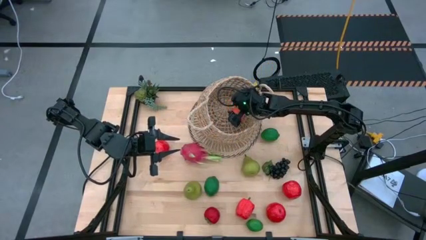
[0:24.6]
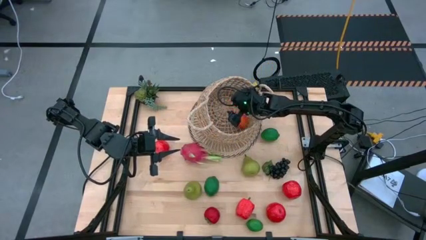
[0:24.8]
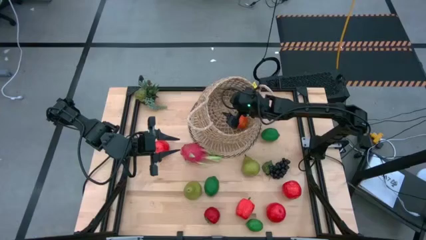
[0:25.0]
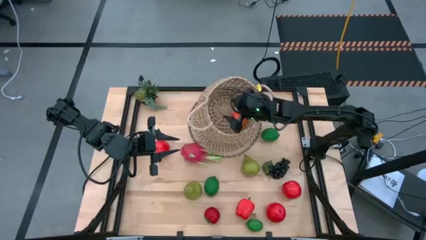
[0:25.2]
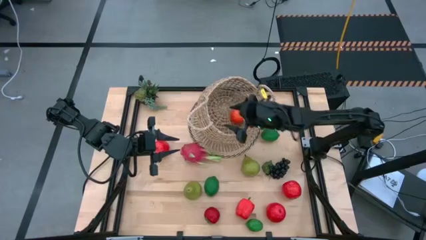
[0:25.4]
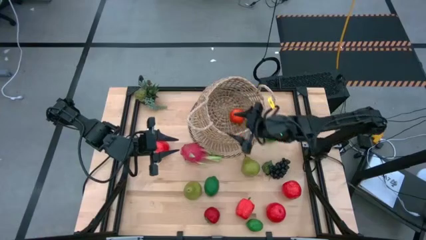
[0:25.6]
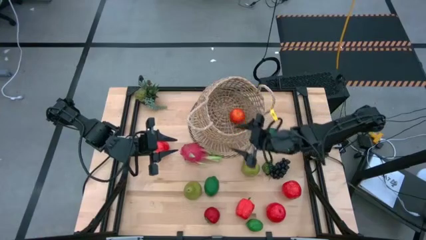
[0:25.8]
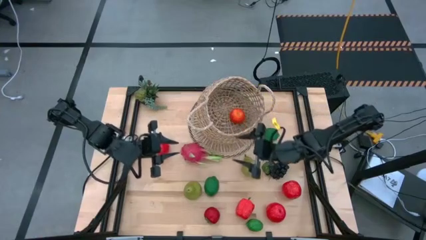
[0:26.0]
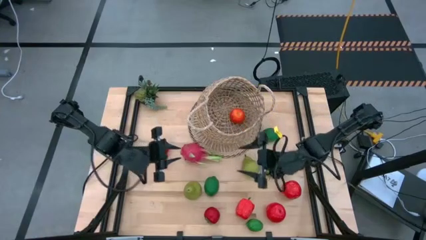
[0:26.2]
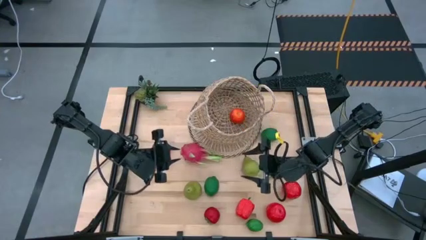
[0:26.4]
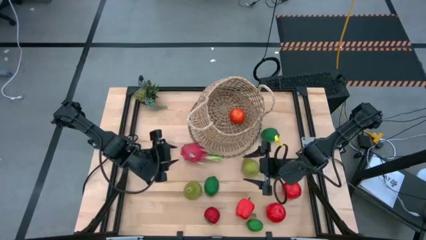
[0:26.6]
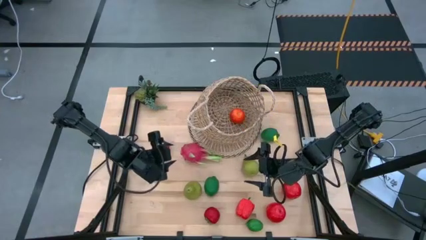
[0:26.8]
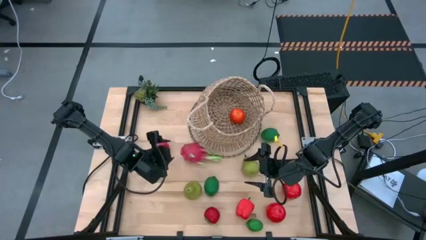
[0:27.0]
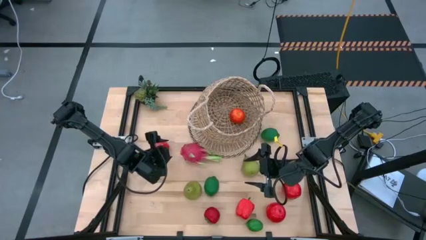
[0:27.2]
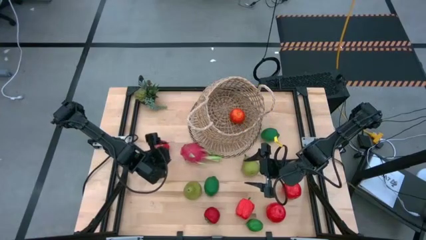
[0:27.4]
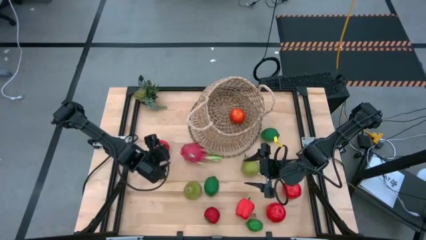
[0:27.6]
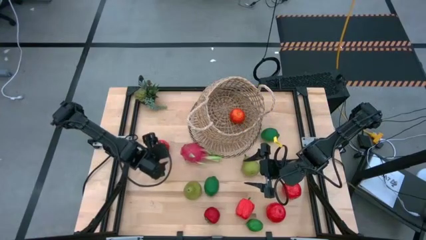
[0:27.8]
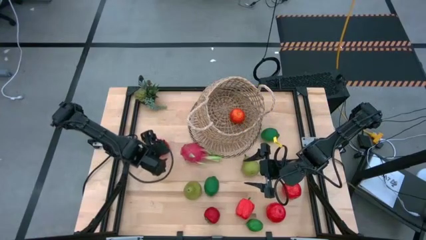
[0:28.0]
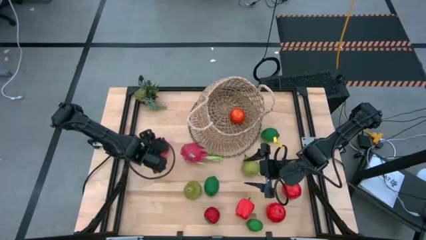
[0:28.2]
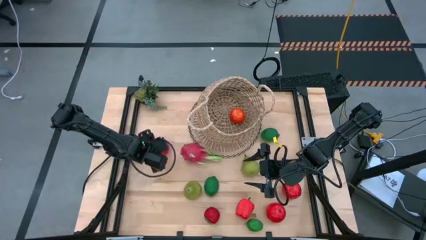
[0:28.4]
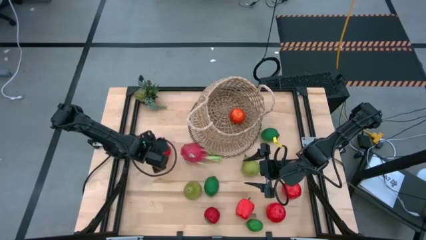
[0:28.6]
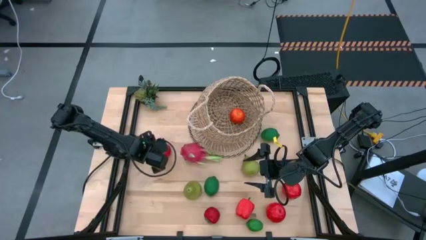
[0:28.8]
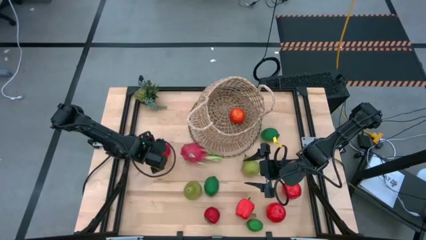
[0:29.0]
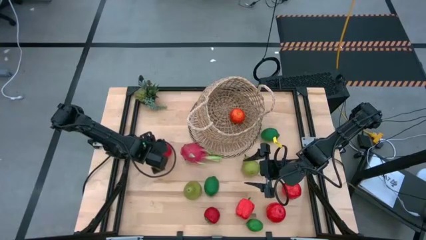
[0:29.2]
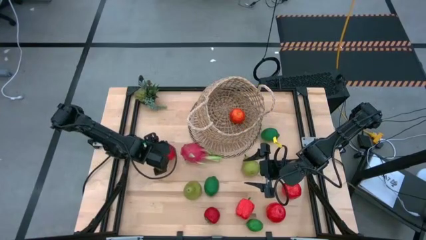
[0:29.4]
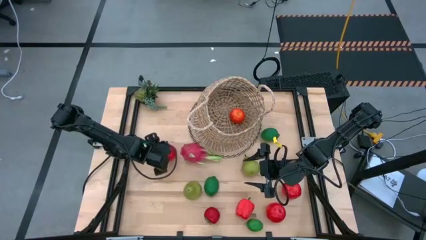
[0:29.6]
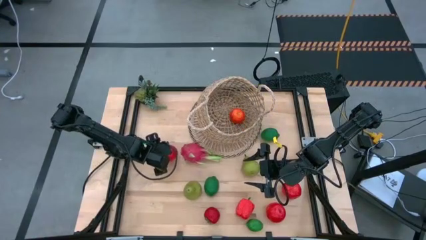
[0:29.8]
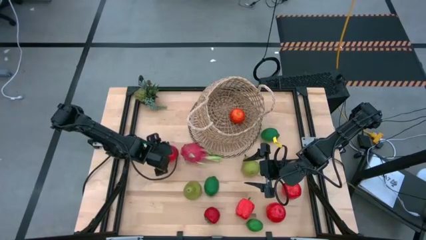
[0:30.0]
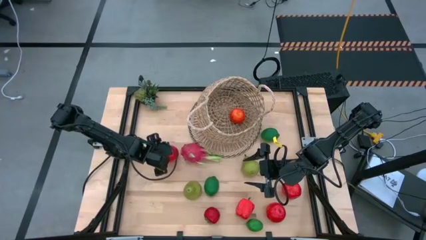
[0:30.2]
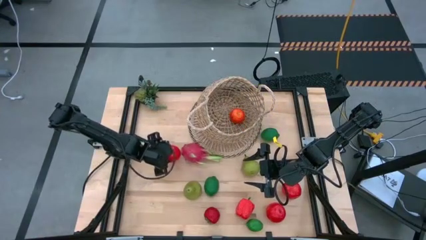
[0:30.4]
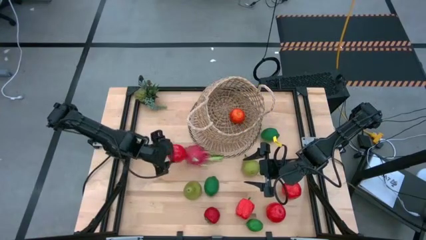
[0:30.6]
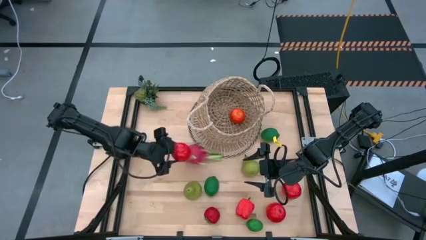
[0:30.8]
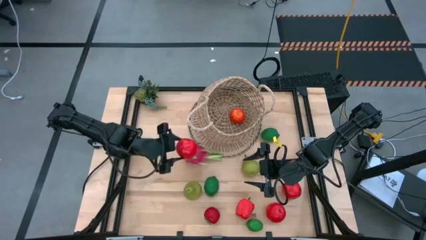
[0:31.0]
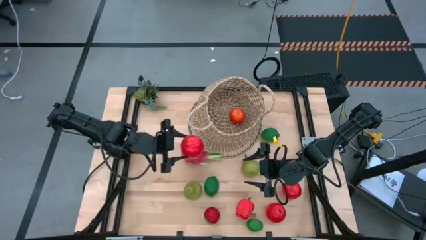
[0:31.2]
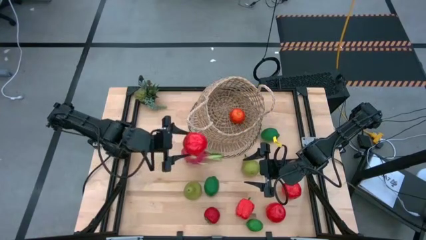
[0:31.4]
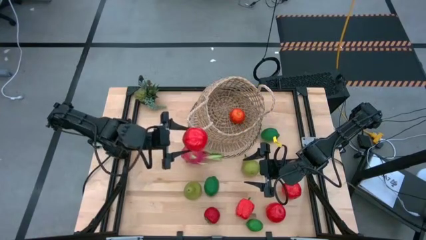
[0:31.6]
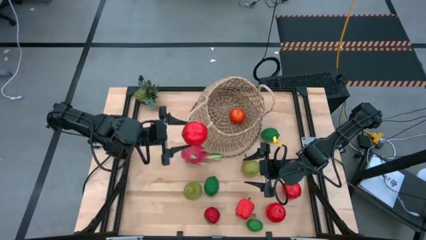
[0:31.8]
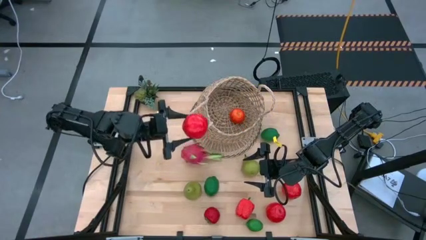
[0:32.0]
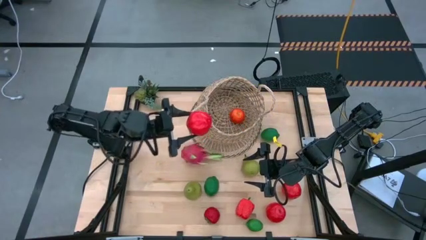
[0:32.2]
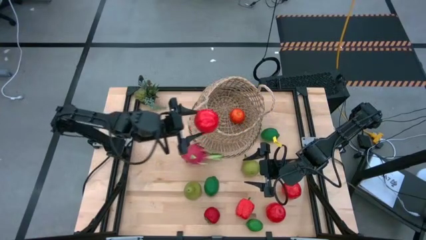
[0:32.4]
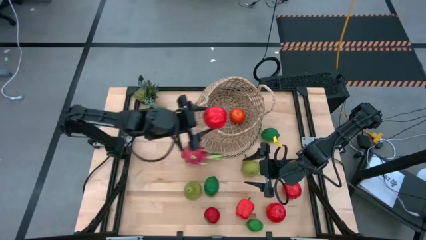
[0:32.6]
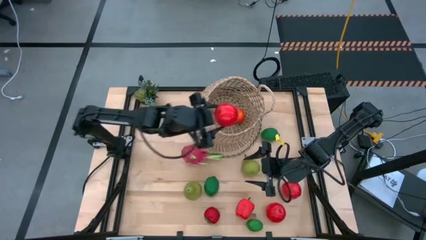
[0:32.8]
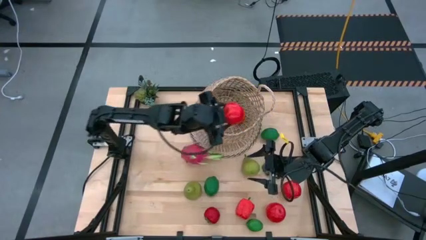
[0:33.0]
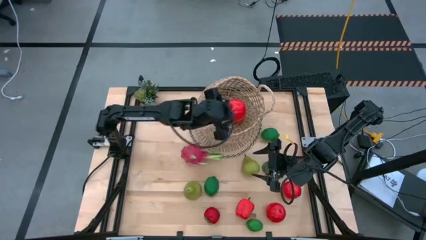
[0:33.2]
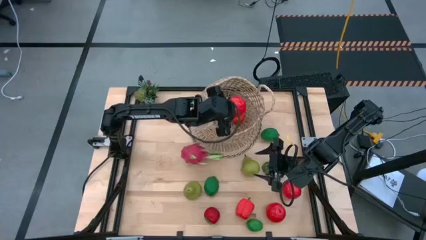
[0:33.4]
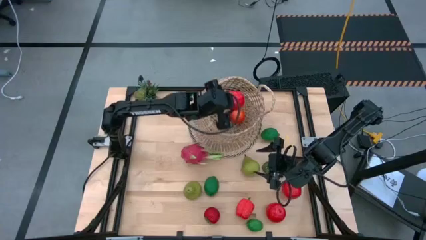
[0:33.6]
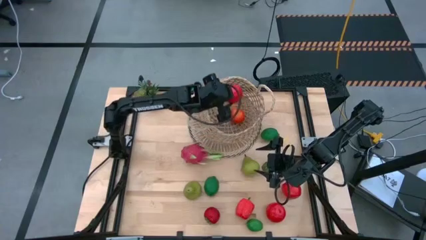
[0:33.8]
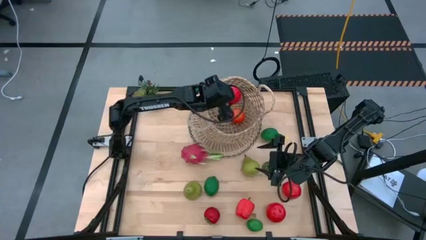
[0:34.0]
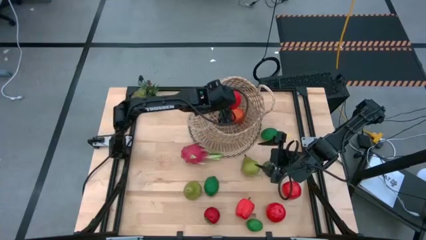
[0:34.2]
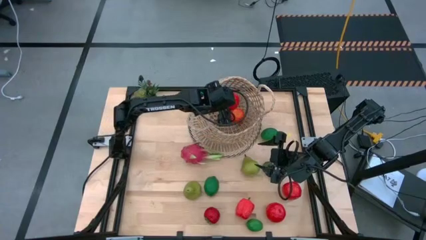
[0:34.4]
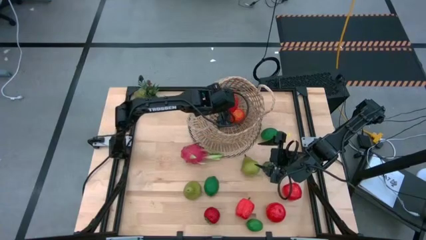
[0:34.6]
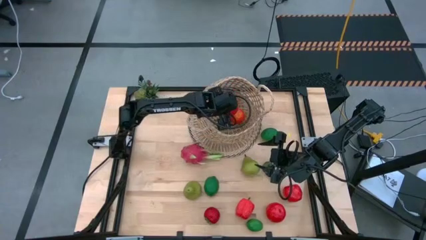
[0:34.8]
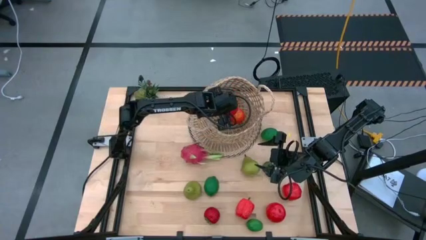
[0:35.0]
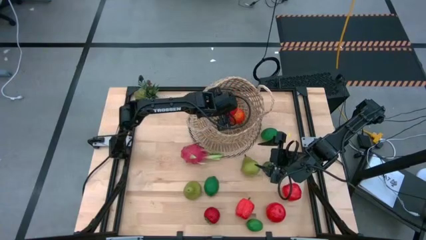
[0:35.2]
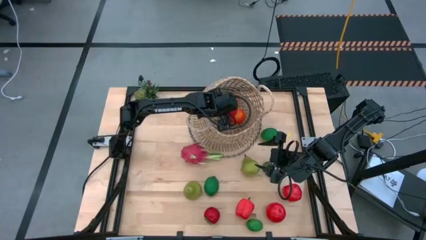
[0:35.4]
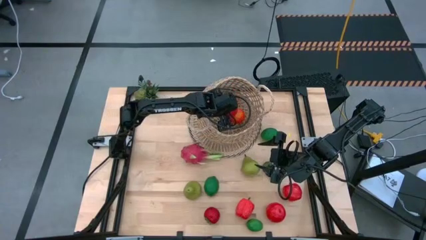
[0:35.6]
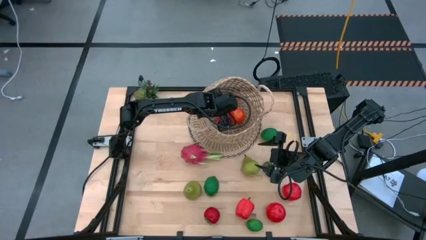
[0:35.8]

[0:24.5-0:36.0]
Task: Build produce basket
Put the red apple into the basket
